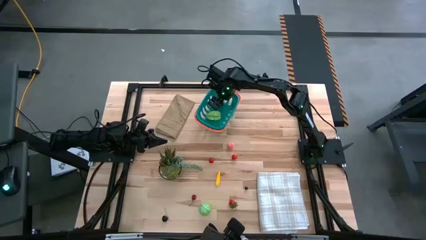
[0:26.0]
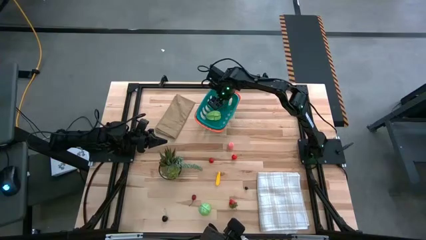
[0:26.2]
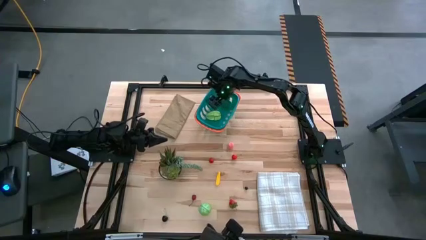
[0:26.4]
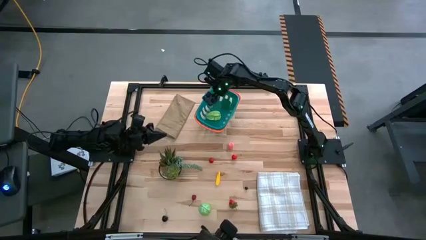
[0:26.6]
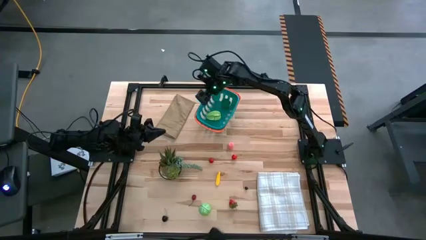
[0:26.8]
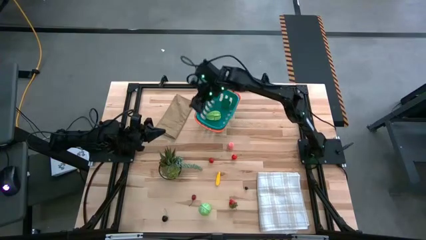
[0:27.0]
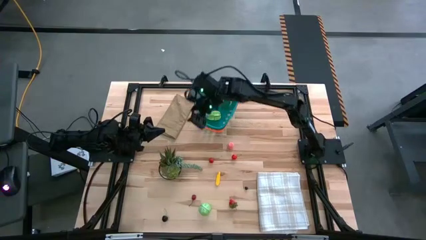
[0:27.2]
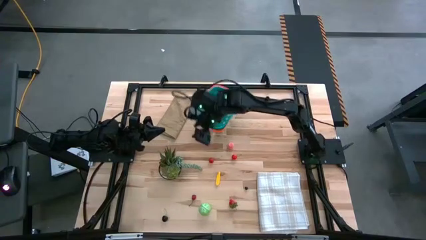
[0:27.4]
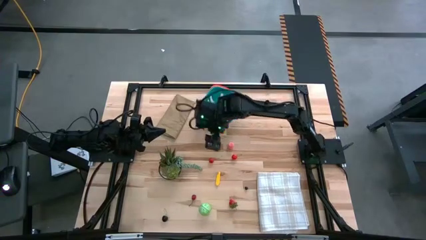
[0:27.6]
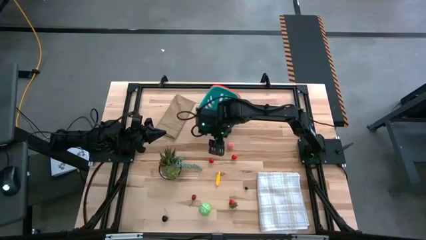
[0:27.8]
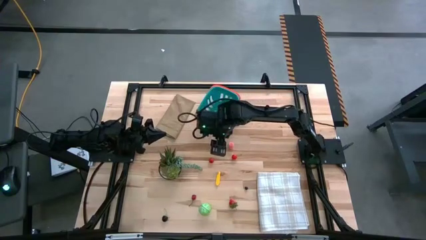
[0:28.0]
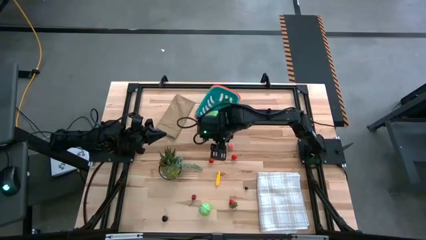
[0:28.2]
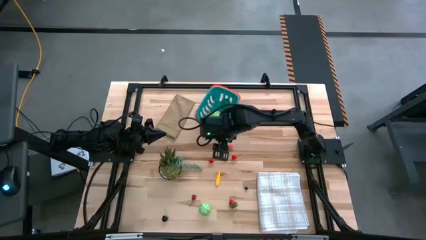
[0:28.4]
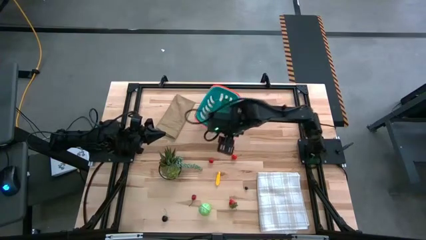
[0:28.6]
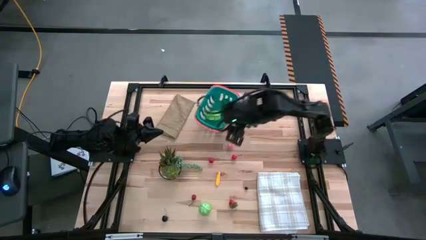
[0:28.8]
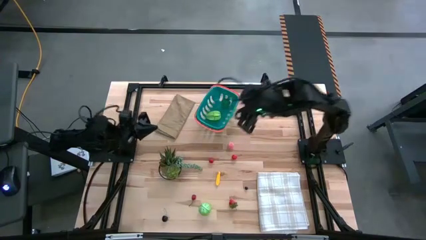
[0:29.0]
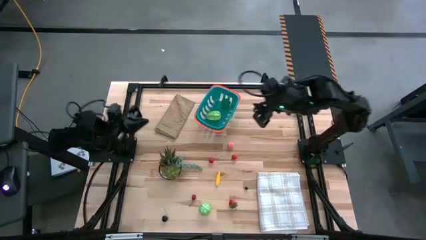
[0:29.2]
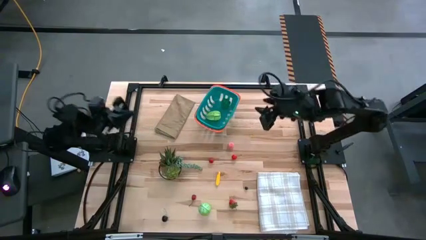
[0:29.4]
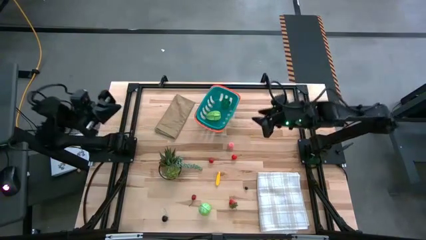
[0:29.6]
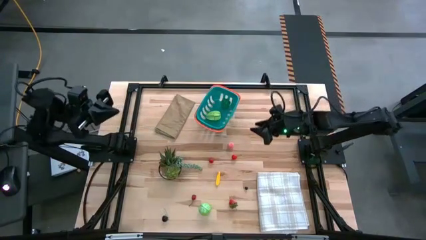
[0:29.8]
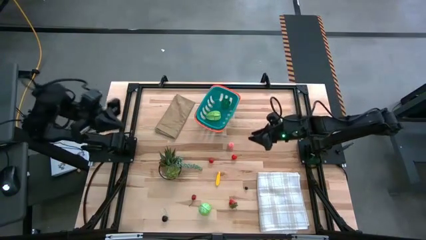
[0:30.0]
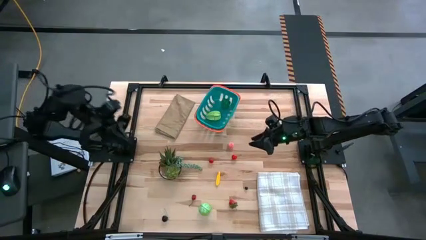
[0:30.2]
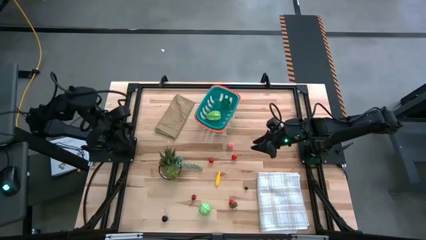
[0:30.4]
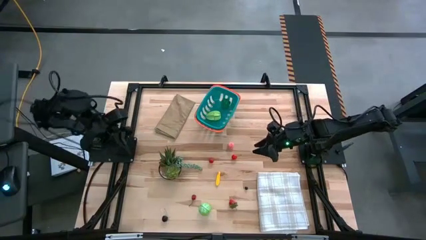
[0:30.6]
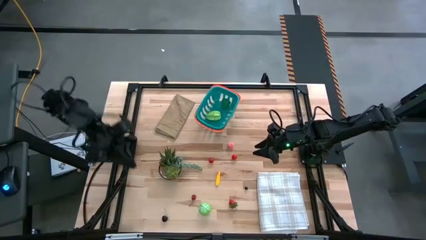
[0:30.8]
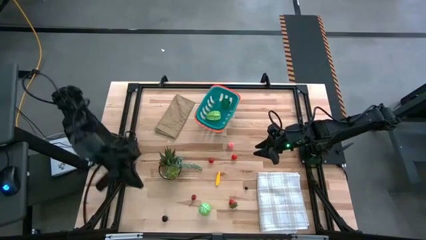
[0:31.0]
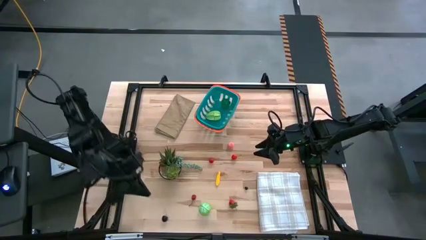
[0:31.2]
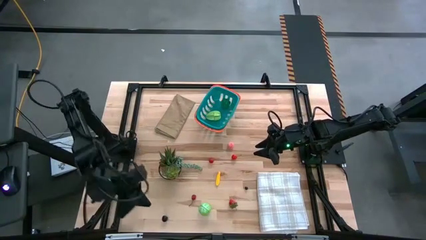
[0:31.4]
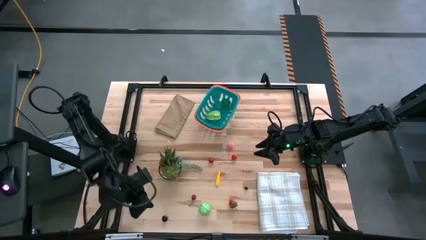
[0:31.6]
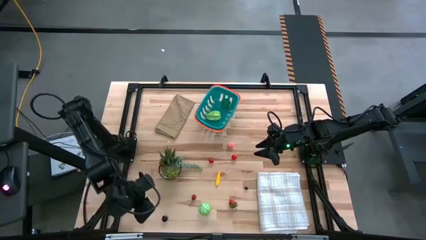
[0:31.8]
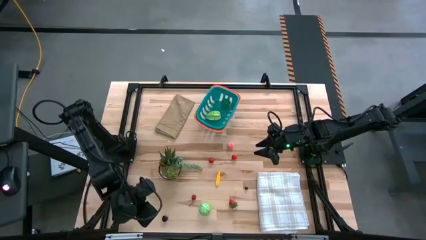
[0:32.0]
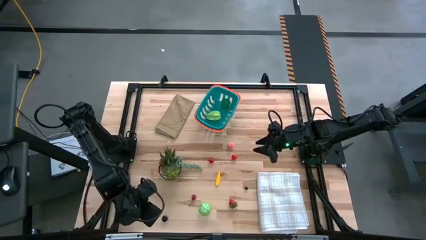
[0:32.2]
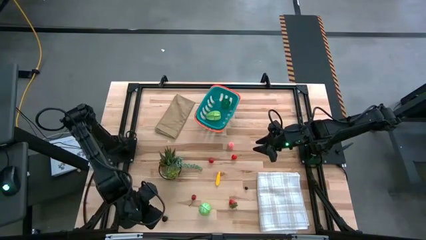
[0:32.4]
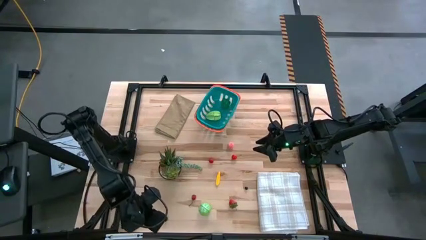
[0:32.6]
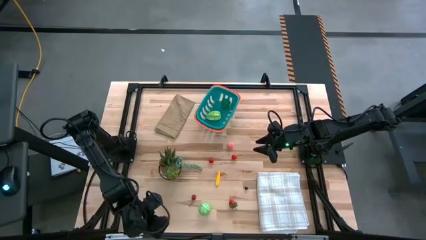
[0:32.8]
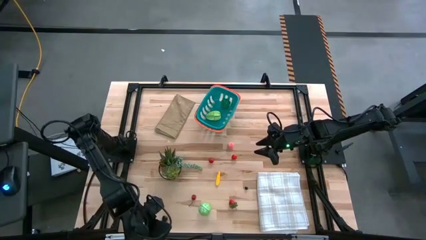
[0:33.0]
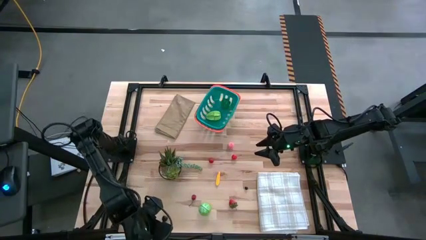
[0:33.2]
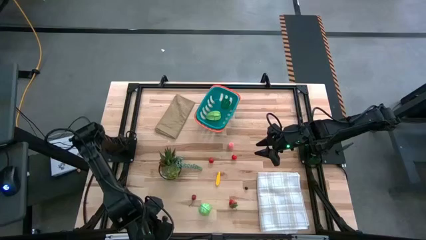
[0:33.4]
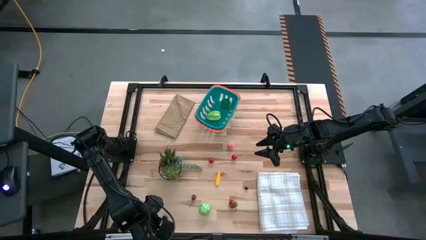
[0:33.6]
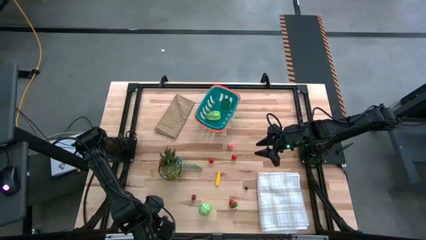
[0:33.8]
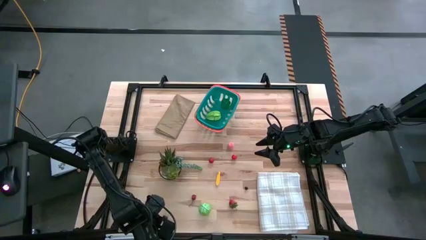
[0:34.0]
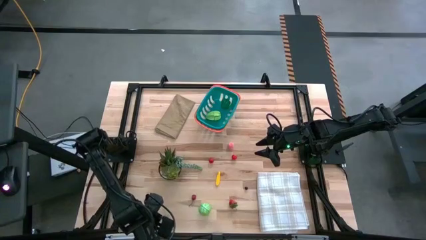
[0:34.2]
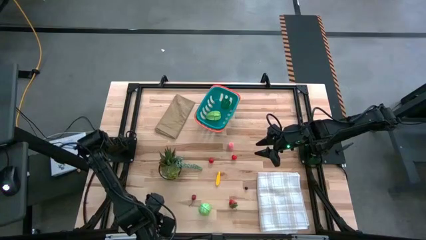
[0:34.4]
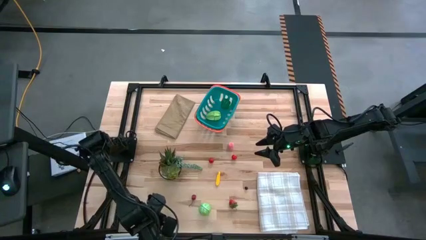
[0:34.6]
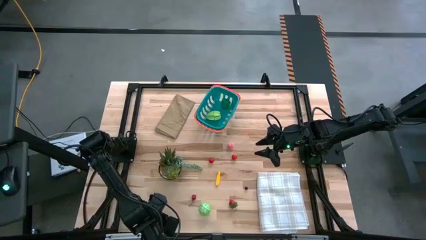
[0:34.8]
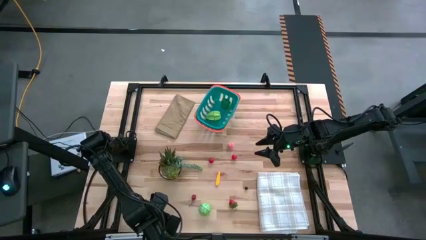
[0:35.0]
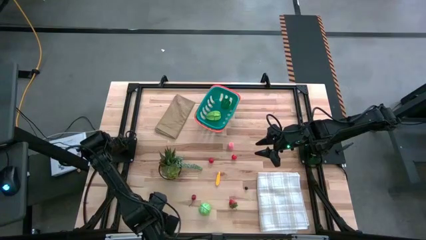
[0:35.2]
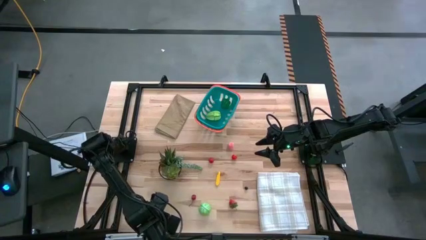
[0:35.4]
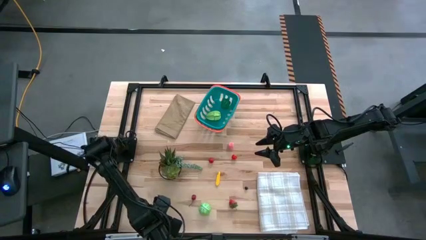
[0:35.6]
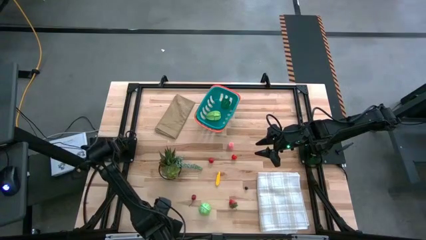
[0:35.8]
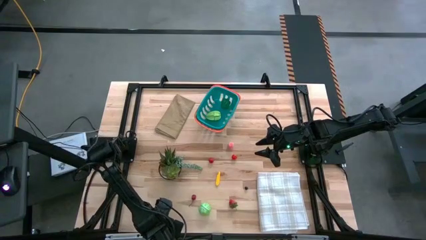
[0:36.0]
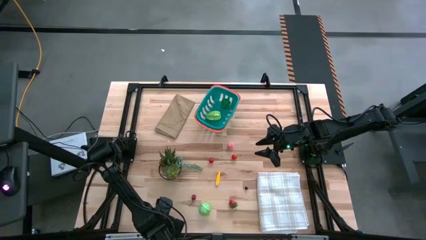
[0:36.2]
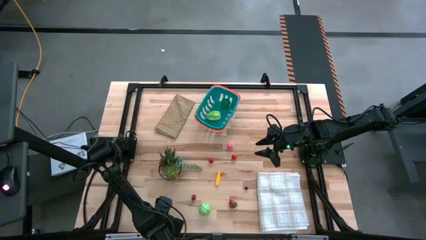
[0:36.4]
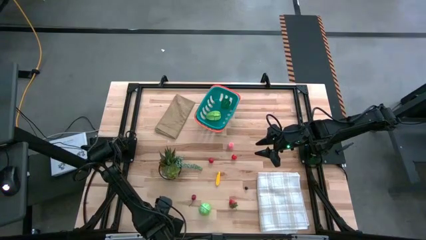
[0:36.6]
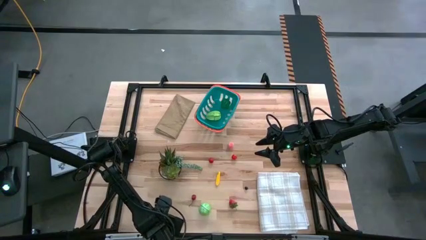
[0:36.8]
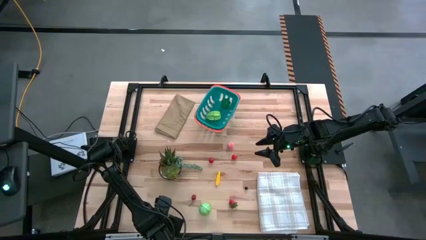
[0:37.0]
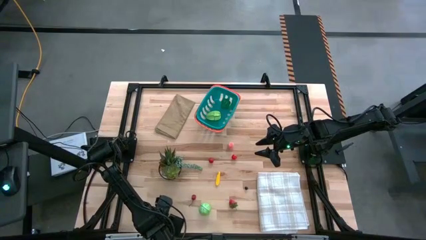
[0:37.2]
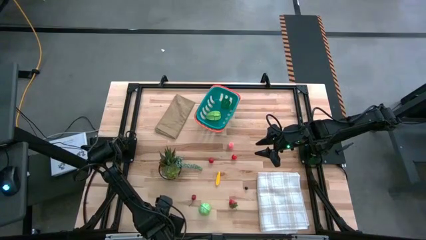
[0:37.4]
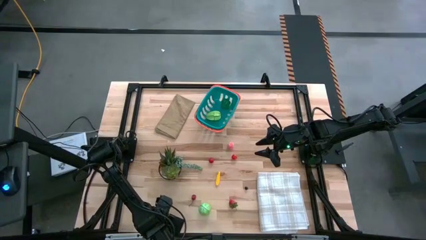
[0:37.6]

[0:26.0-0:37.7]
Task: Pick and placing Produce into tupperware
Put the left black cherry in the green basket
